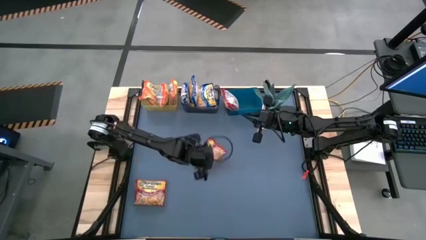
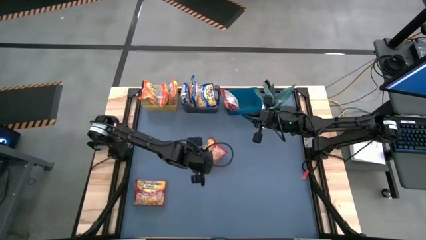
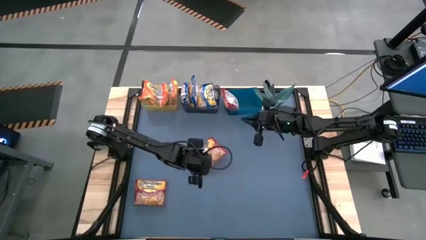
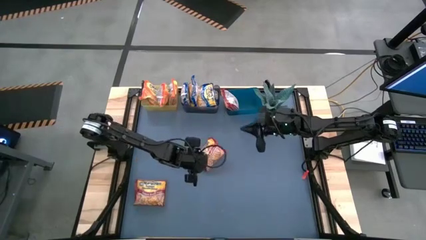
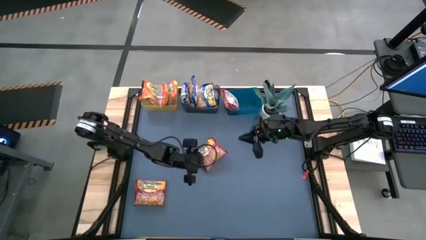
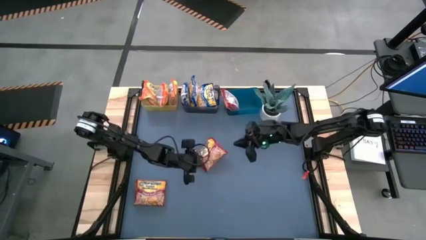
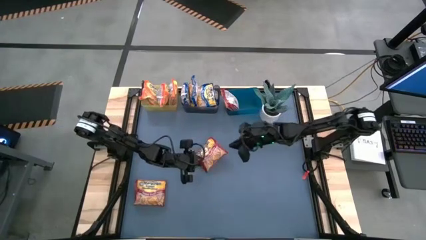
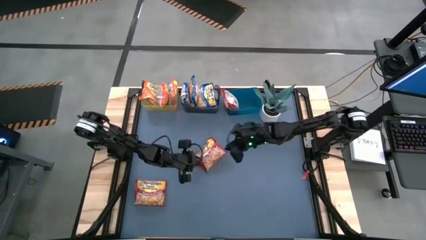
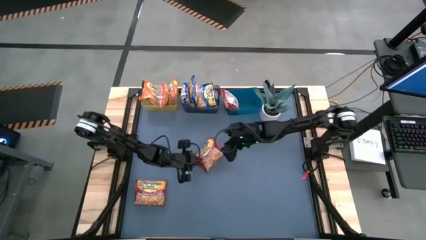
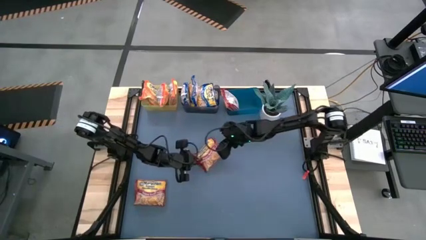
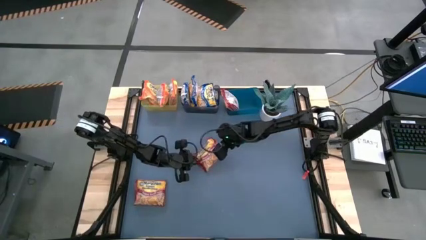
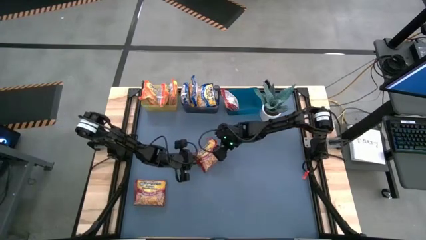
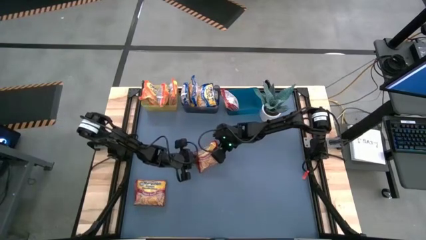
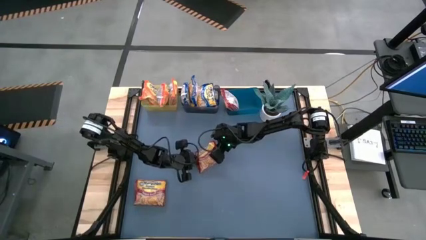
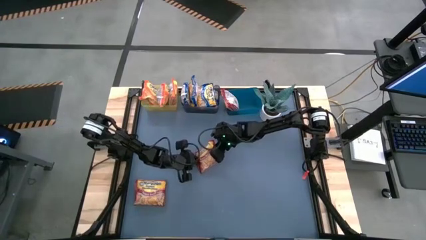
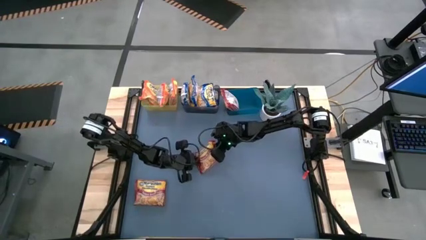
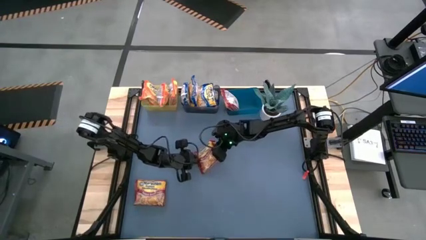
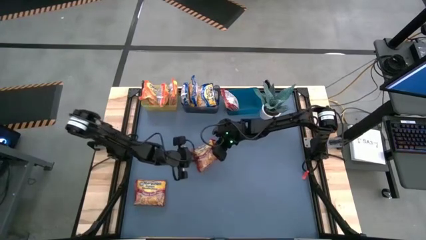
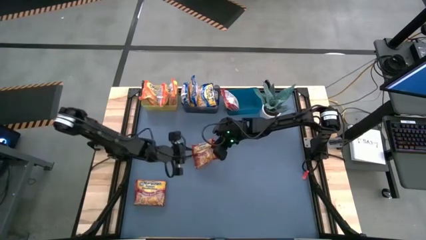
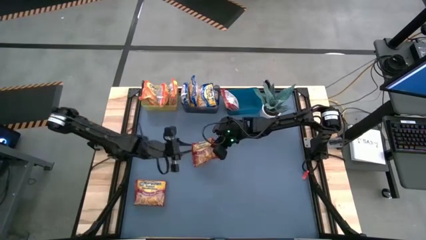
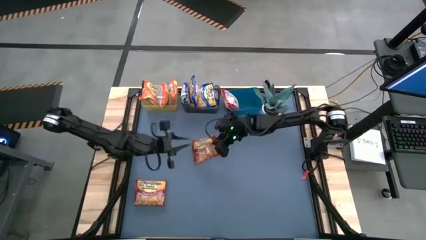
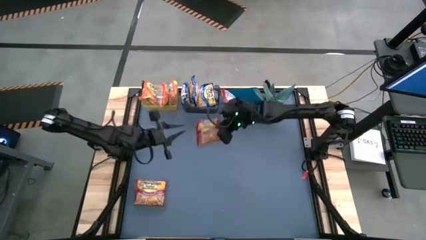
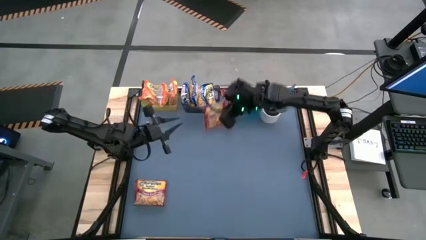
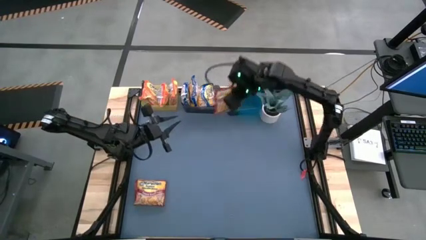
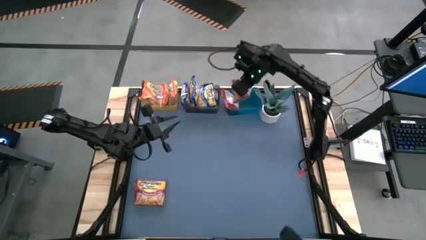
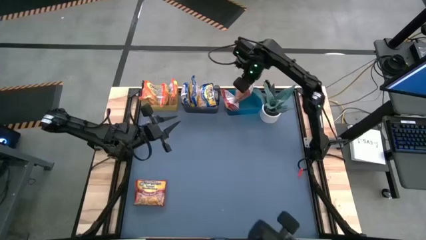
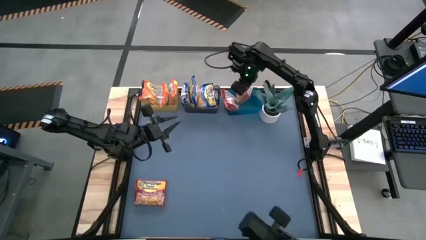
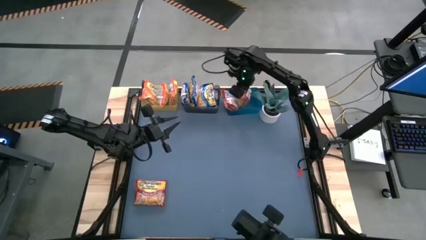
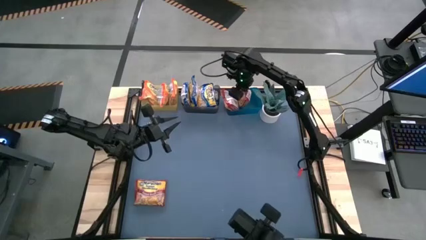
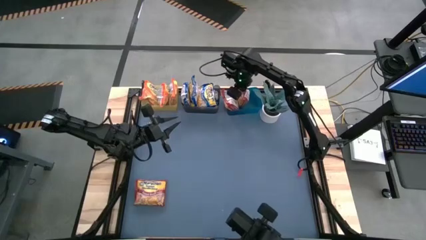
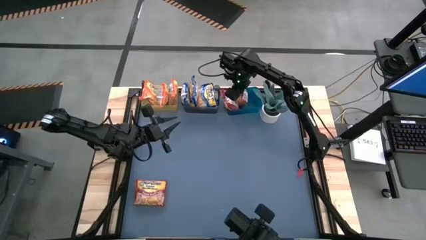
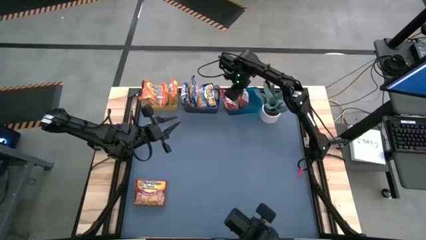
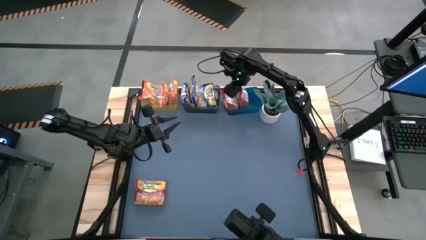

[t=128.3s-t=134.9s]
Task: Sort Maruchan noodles
Put the red noodle pack into the blue bin
